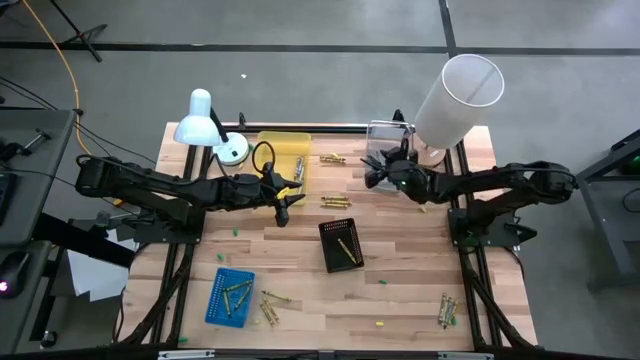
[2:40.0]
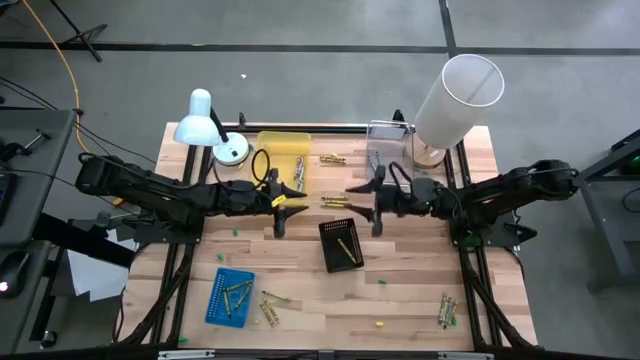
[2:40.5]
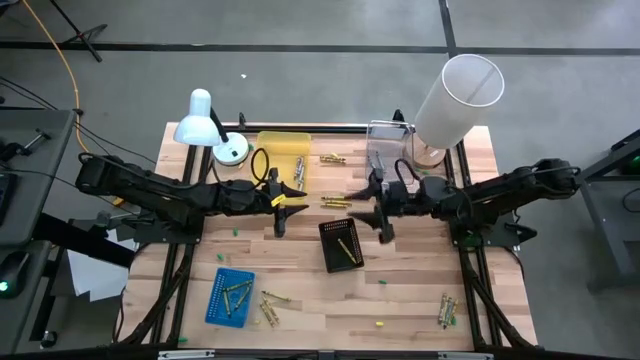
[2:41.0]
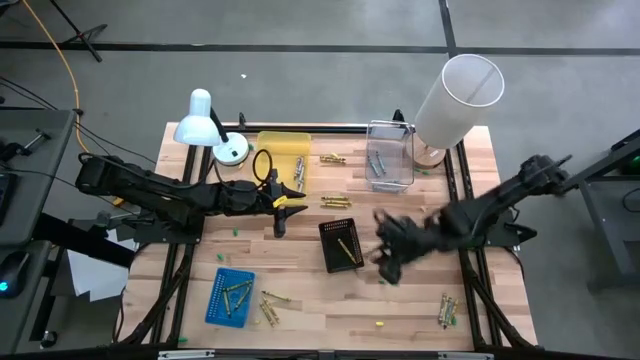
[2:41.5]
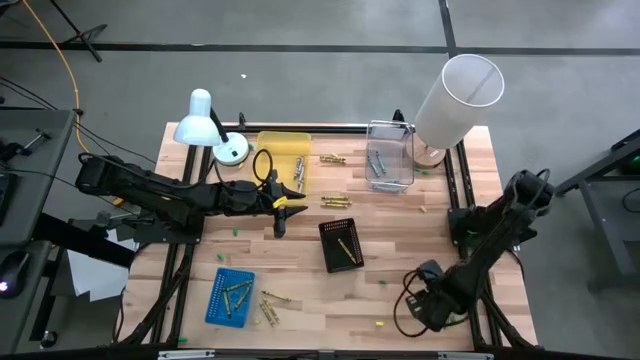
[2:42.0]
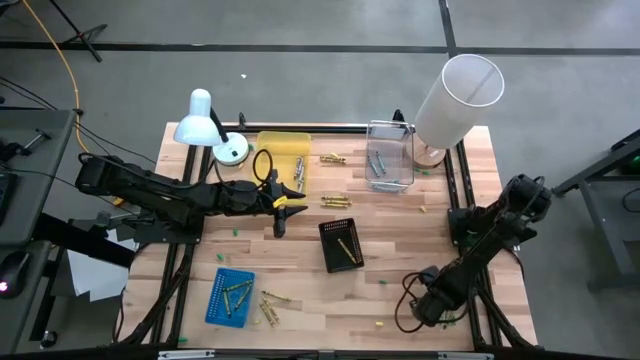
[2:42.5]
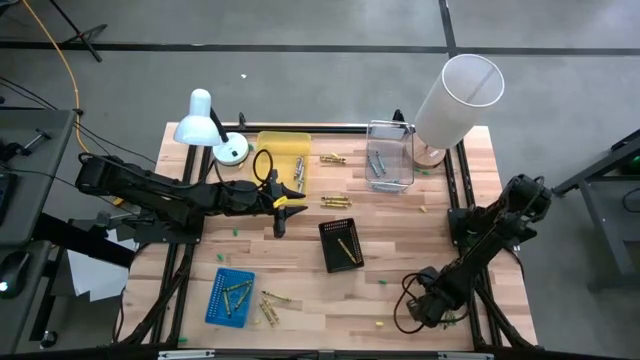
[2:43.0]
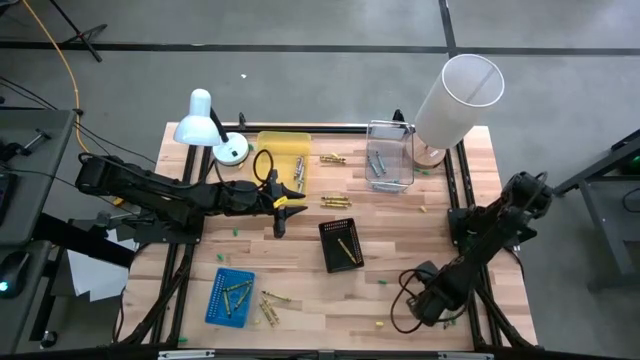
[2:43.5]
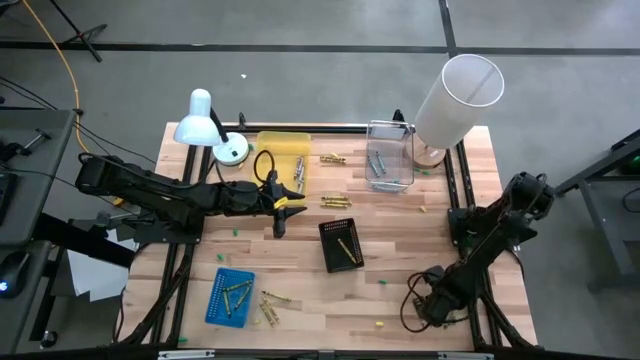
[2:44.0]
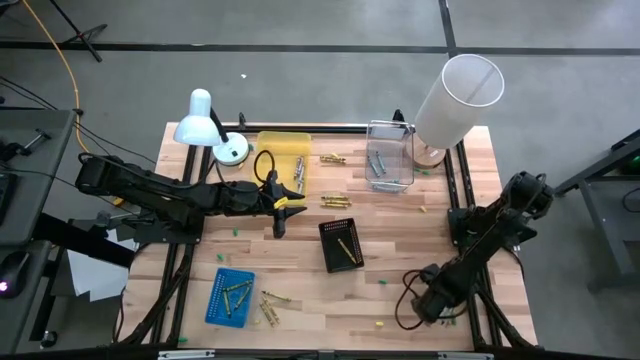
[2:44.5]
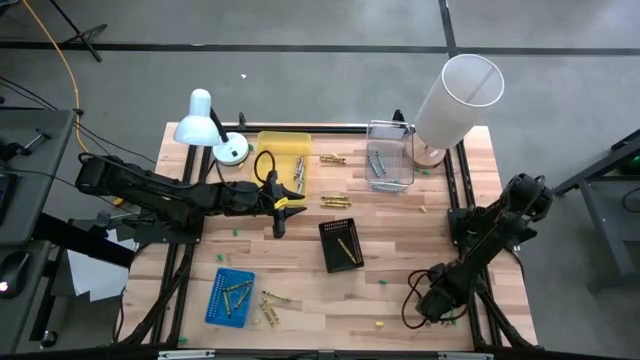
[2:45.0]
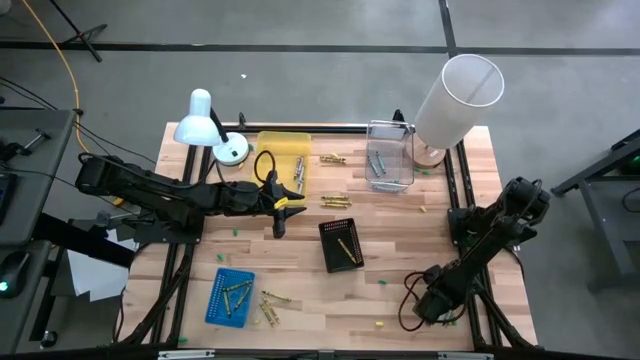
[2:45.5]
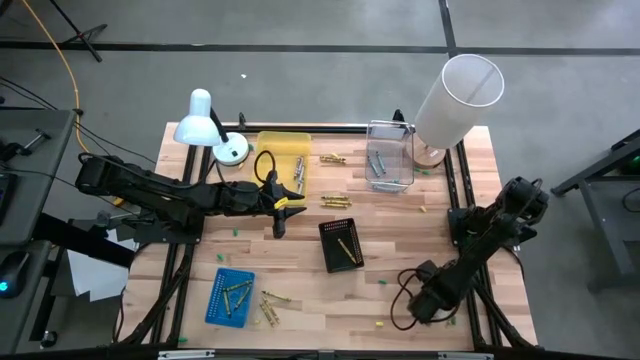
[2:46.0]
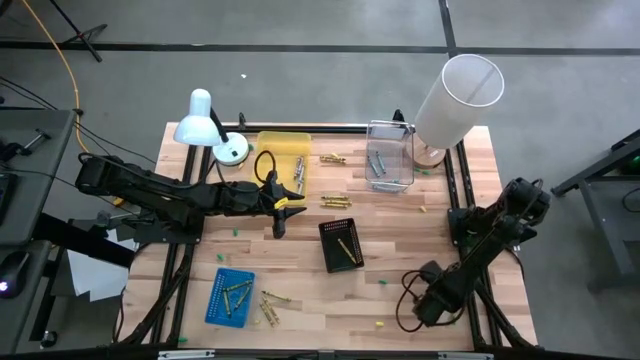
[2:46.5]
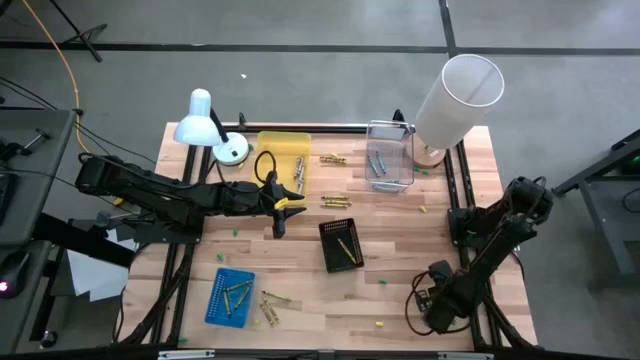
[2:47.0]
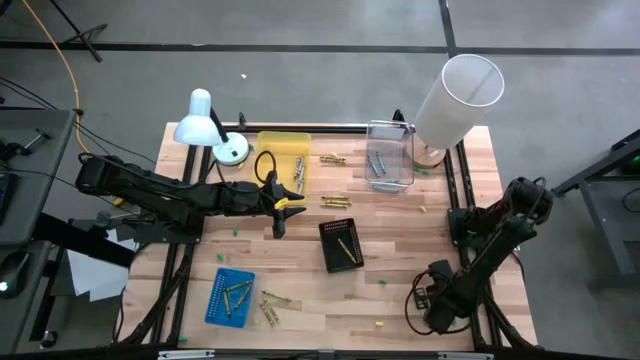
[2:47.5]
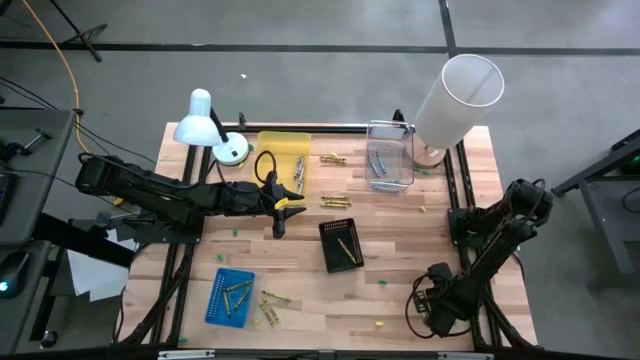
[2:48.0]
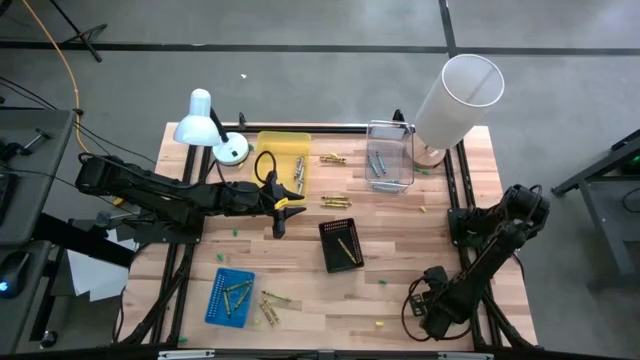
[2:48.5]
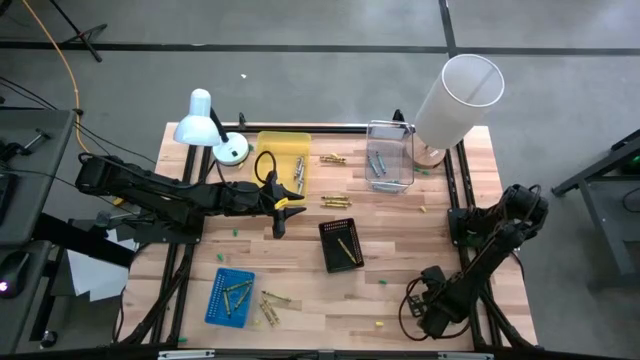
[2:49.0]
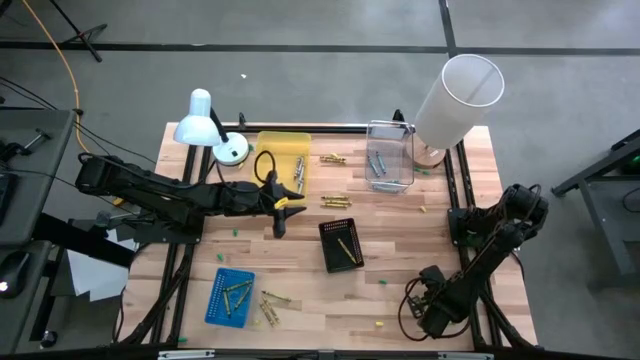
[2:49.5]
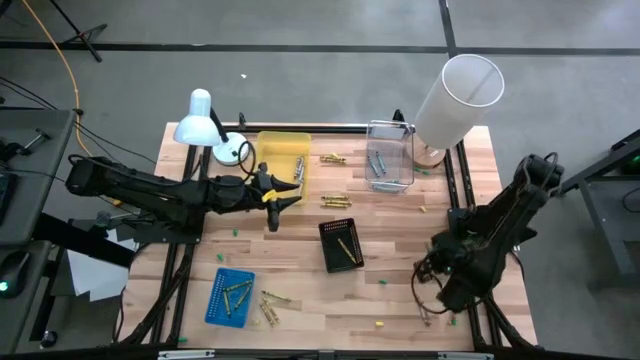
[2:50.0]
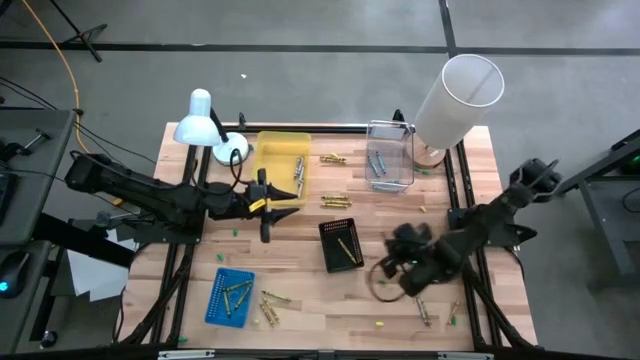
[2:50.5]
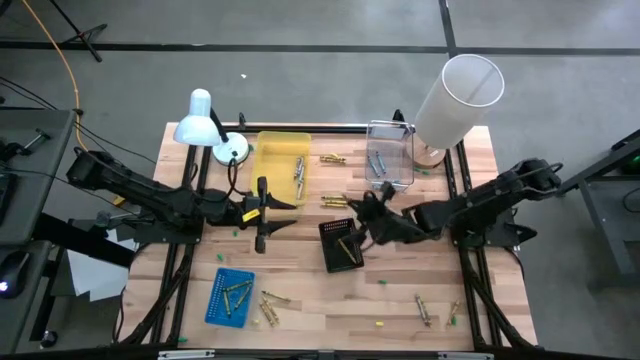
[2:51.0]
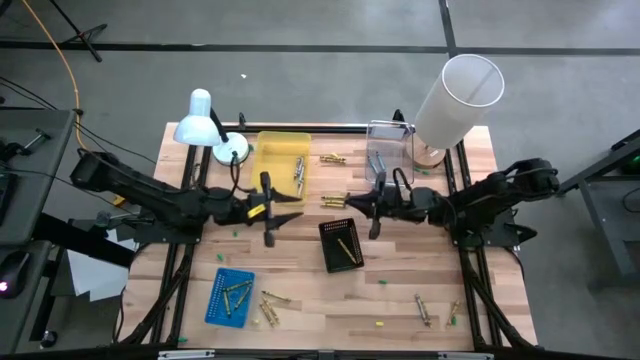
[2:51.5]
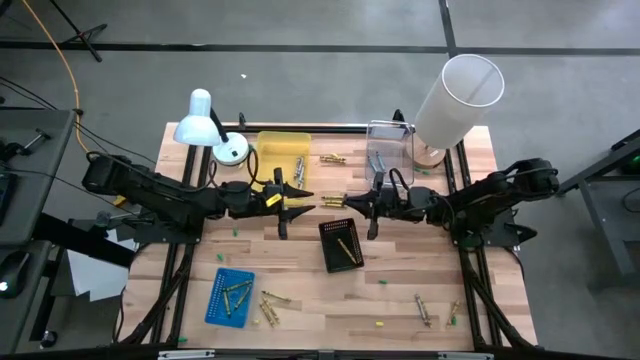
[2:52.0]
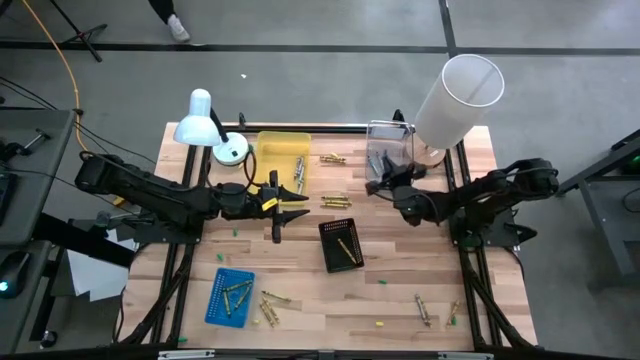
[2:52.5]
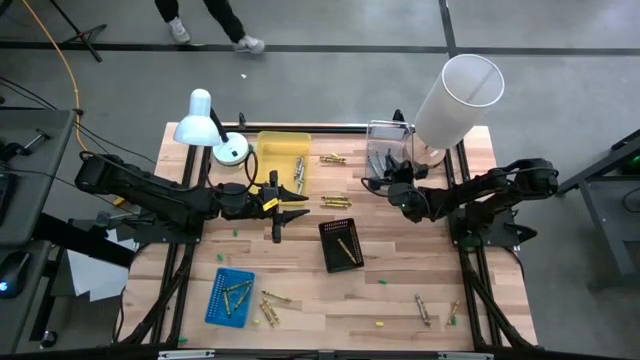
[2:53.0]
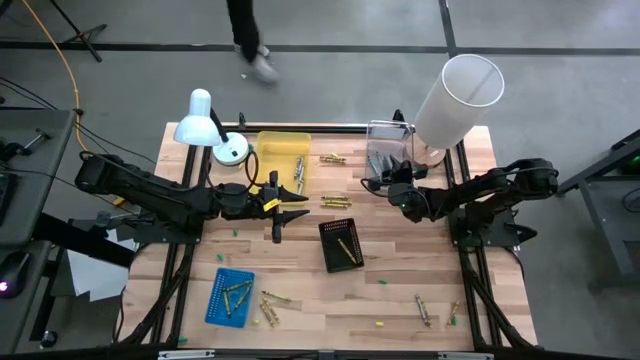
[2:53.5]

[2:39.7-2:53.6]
Task: Sort crayons
Put the blue crayon into the transparent bin

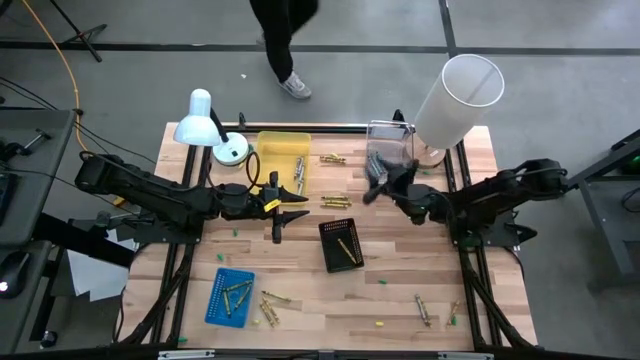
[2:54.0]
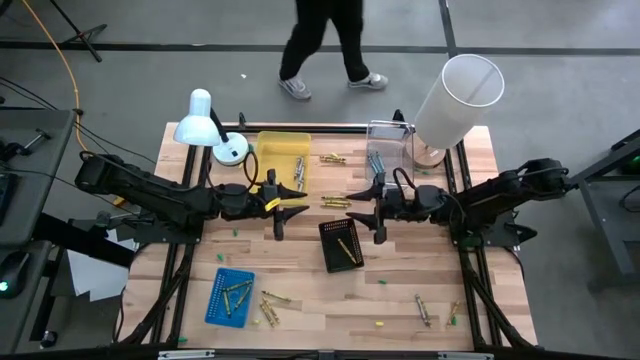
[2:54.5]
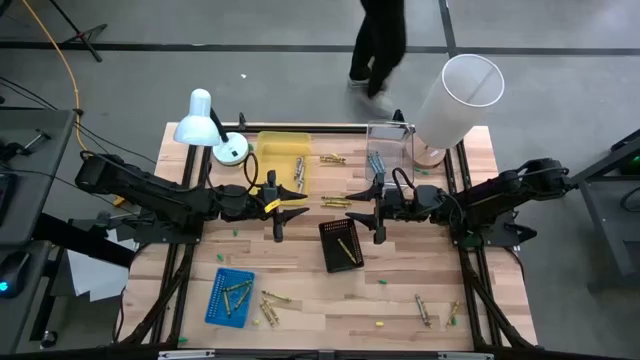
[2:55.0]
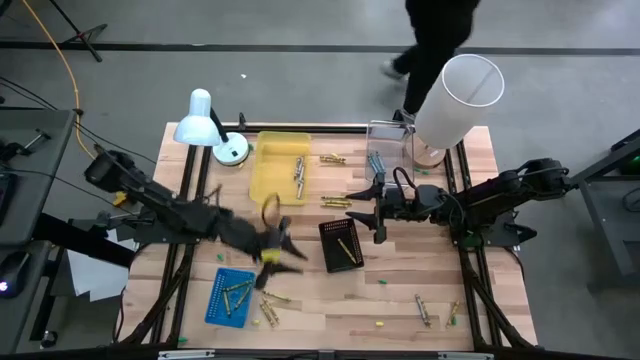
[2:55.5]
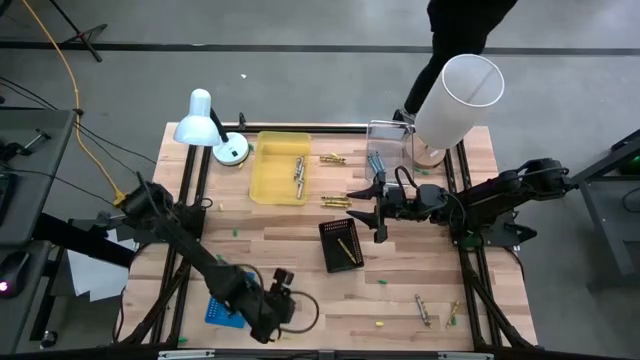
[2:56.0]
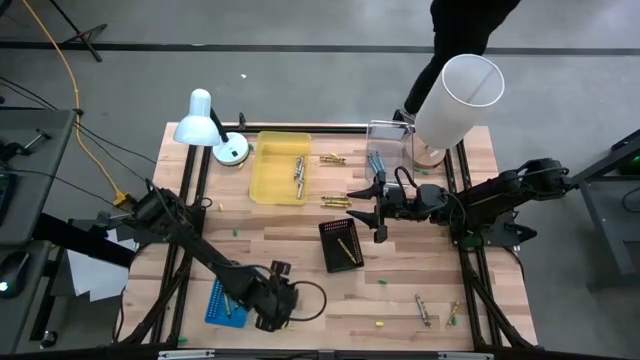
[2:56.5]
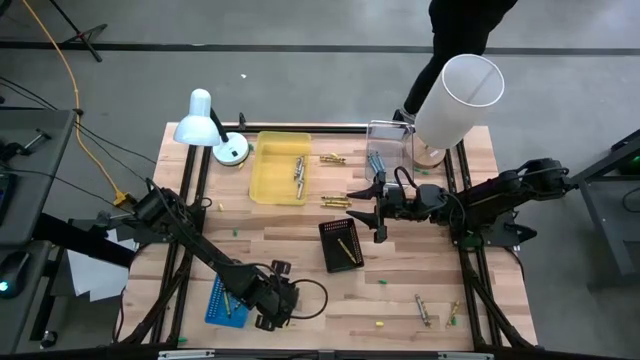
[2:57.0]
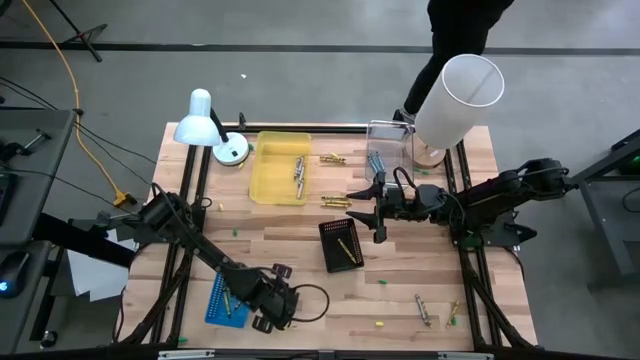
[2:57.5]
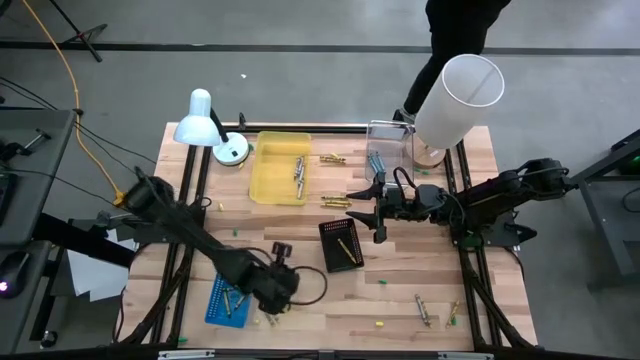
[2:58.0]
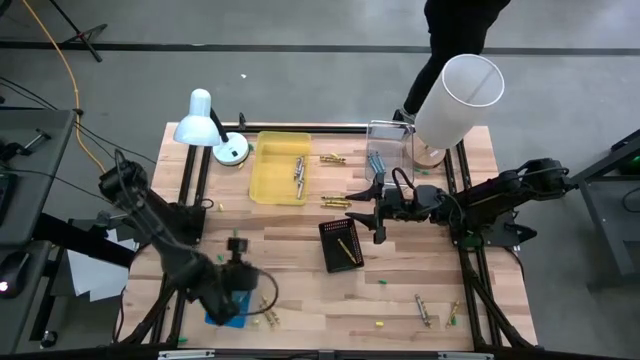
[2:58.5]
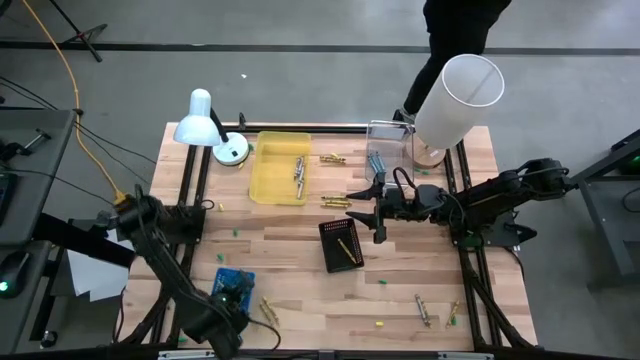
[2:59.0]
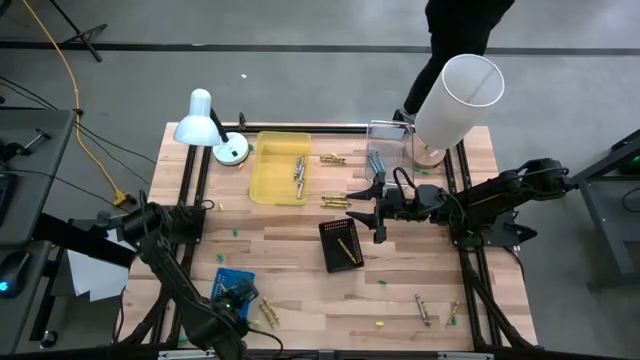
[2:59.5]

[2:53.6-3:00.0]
Put the green crayon into the blue bin

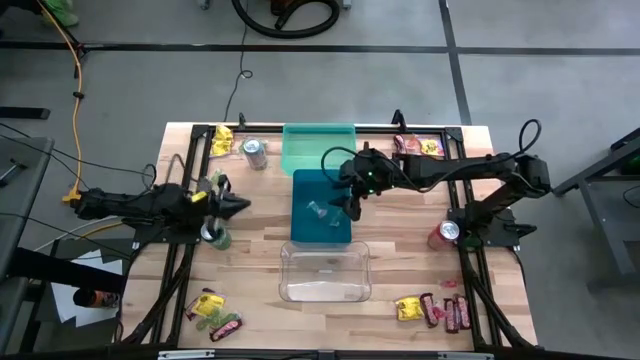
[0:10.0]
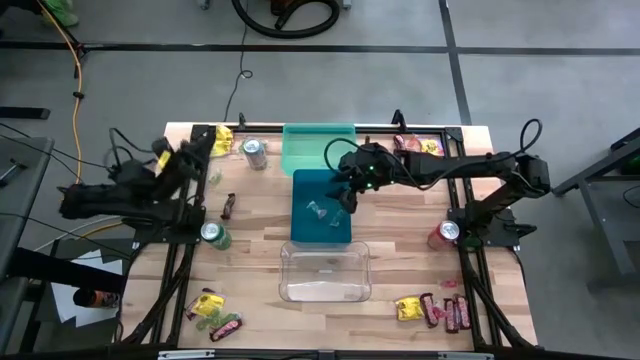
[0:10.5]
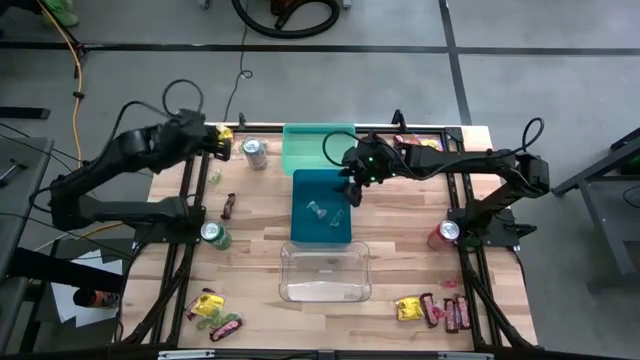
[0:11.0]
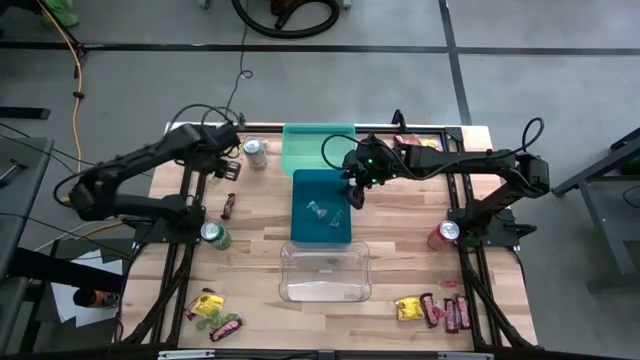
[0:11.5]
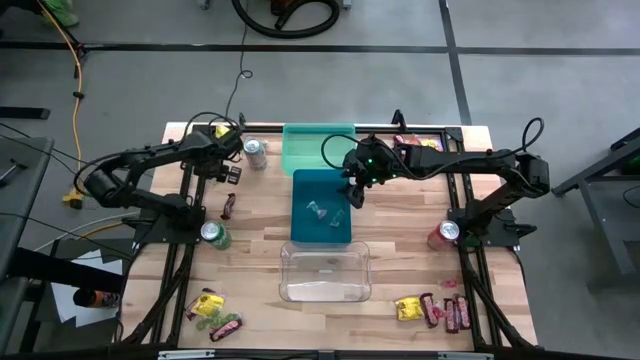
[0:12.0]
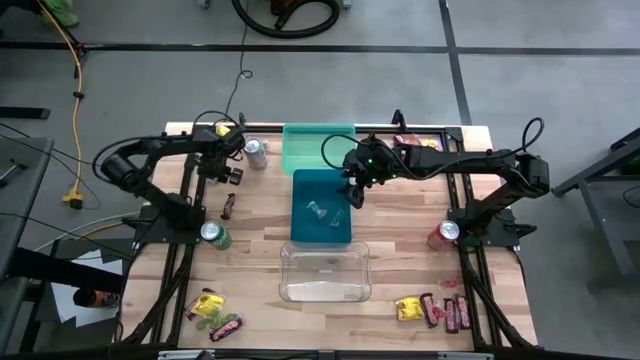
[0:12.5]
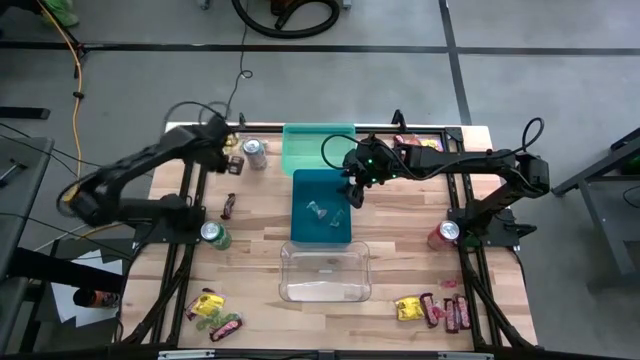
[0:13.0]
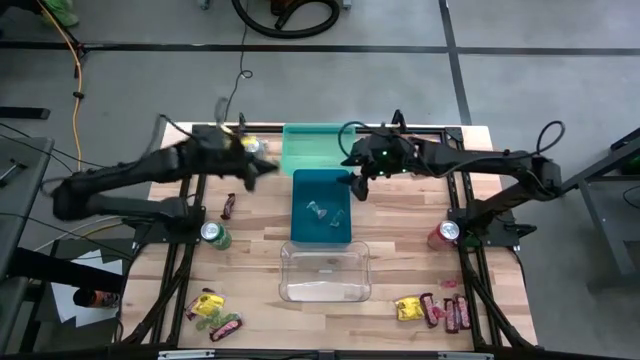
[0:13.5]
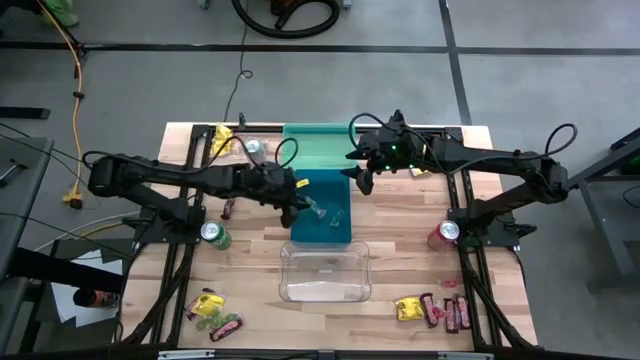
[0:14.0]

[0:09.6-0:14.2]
Task: Sort candy
Put the green candy into the blue bin
